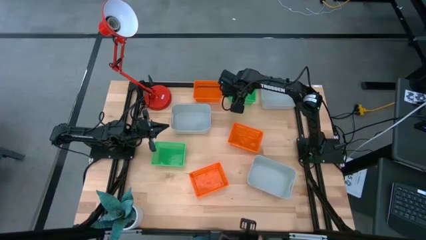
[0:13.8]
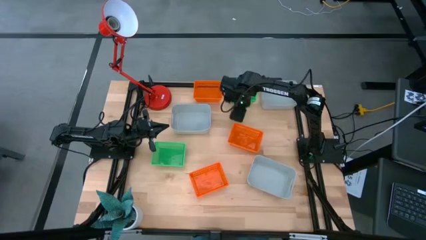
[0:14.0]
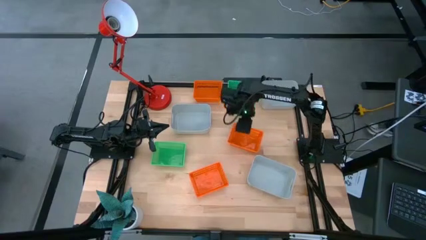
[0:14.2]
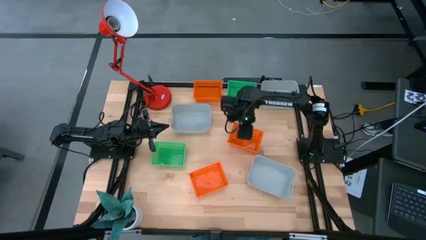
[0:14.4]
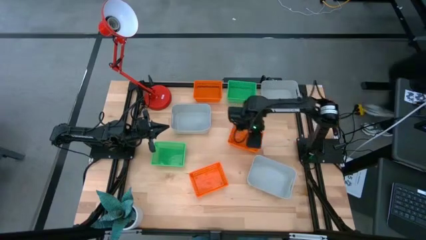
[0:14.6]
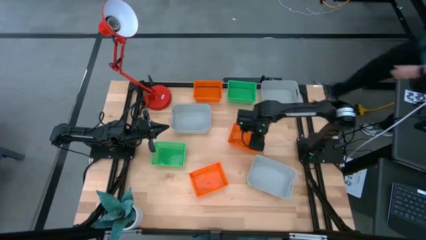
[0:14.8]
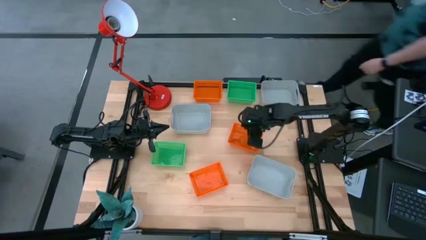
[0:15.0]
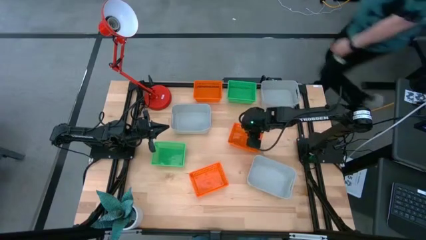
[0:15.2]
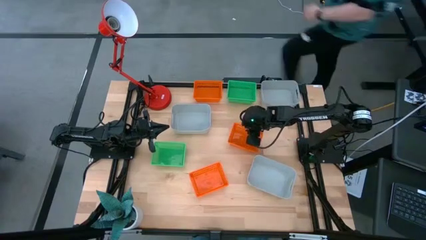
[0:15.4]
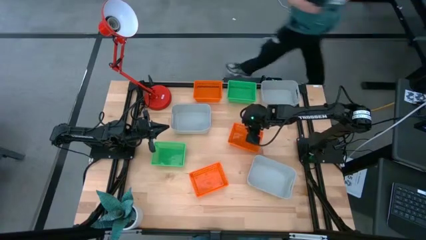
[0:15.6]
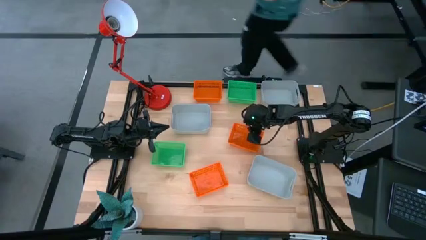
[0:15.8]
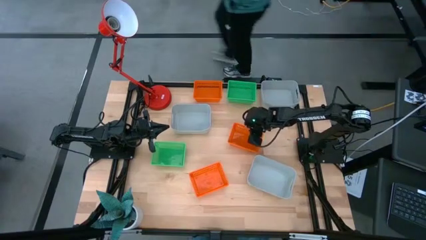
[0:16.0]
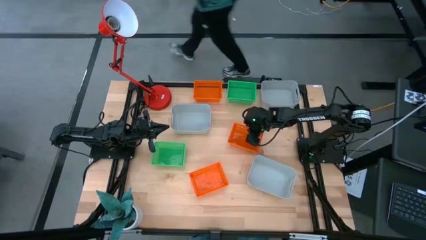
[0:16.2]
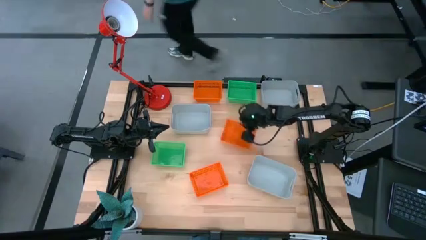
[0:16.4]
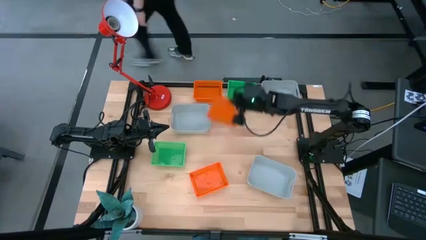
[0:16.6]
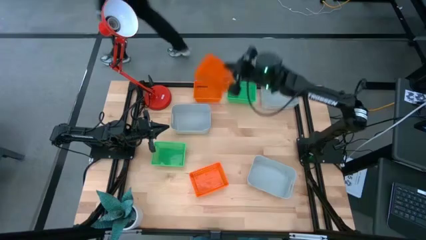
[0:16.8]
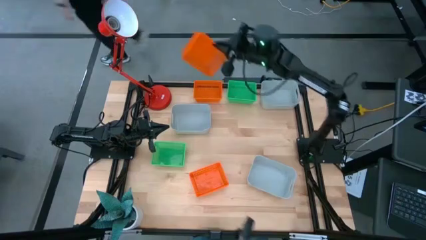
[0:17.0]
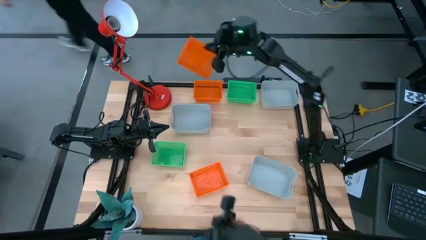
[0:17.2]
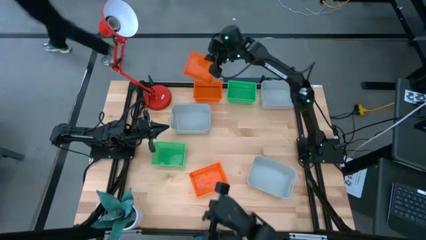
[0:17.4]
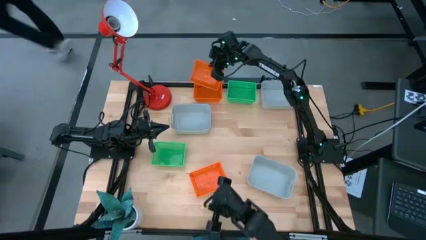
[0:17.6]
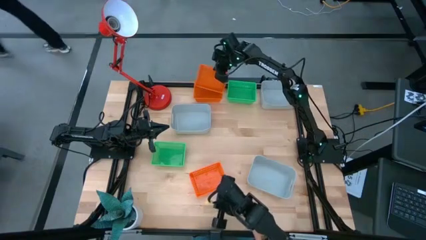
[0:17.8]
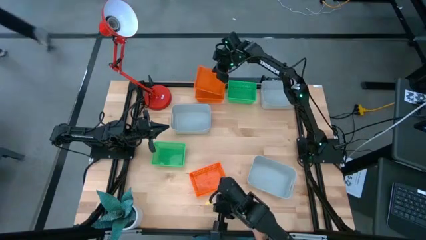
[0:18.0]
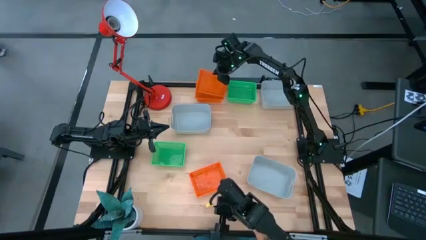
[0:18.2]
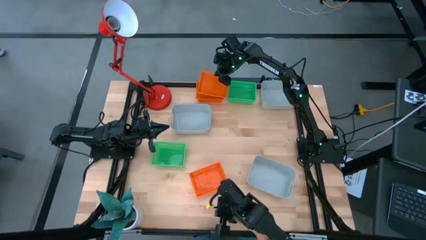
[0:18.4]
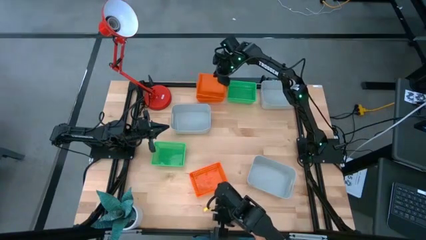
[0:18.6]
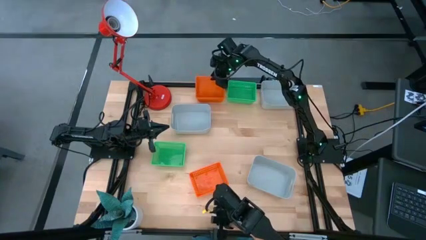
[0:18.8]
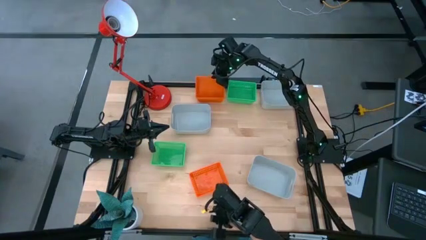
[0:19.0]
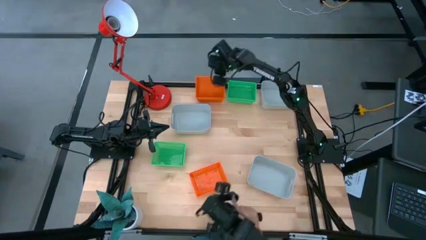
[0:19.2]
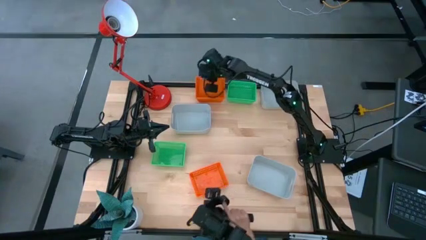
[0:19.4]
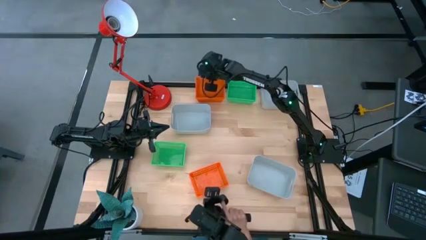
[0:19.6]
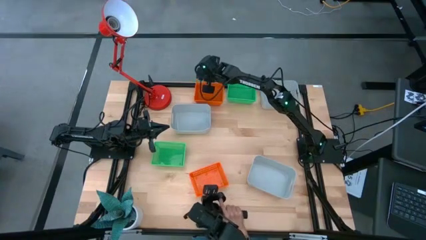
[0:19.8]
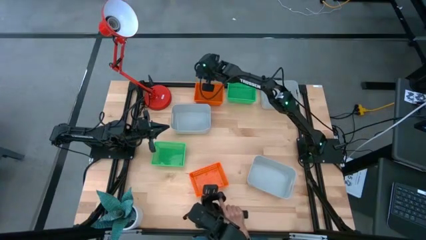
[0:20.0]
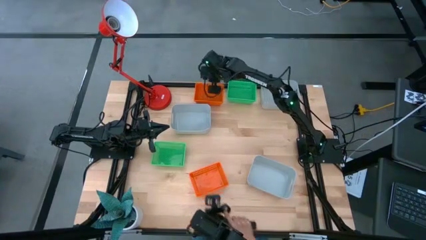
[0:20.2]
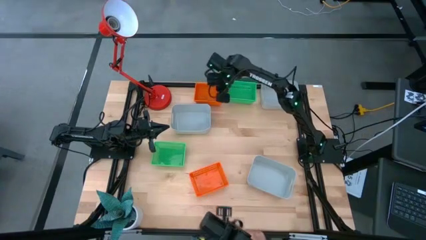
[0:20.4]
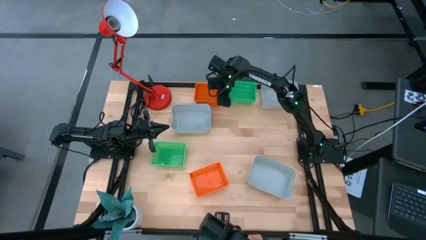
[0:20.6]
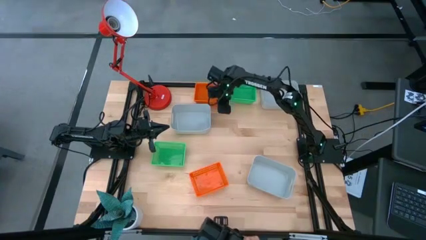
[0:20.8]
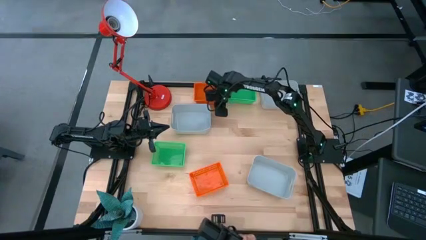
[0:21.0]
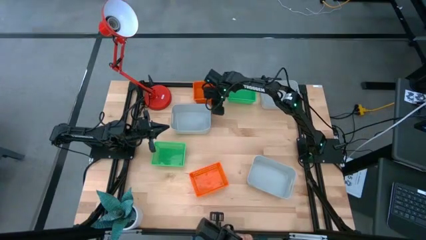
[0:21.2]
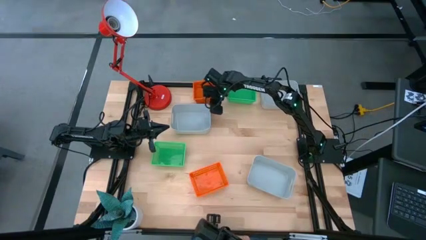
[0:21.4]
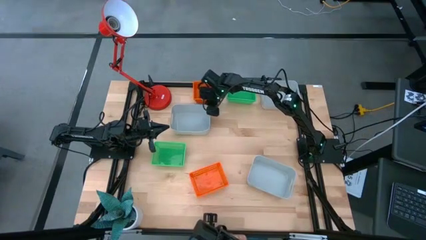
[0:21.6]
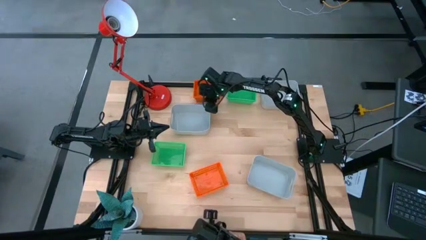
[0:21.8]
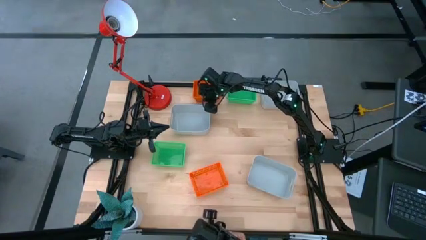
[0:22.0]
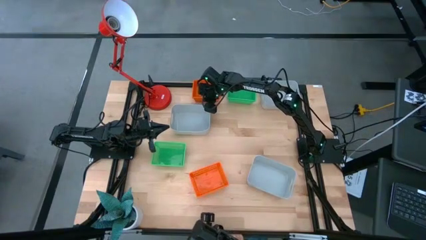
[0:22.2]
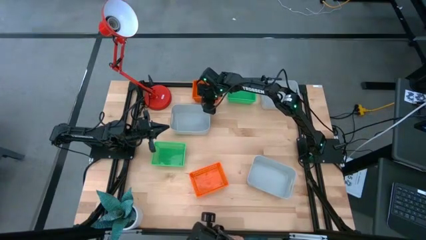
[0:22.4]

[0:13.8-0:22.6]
Stack the middle orange bin on the top orange bin

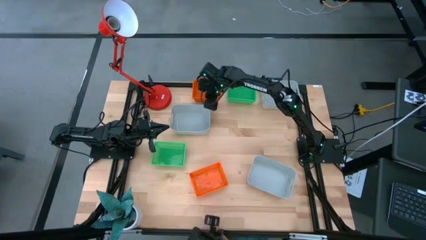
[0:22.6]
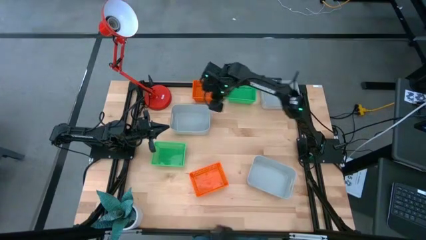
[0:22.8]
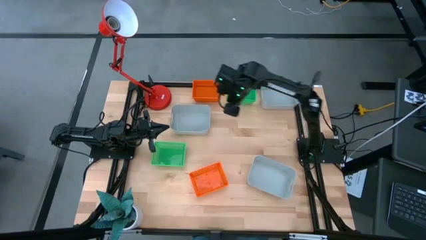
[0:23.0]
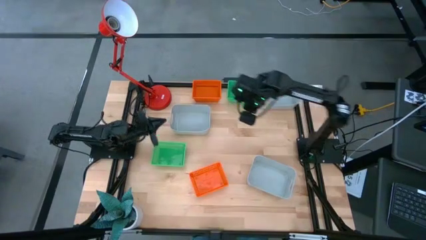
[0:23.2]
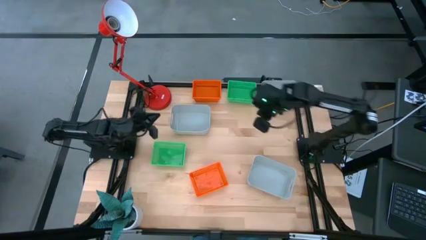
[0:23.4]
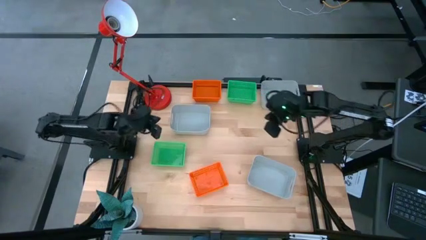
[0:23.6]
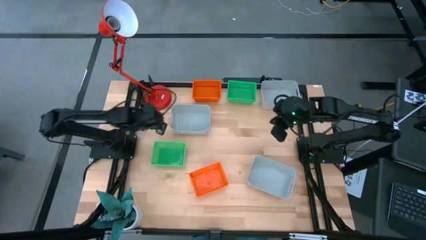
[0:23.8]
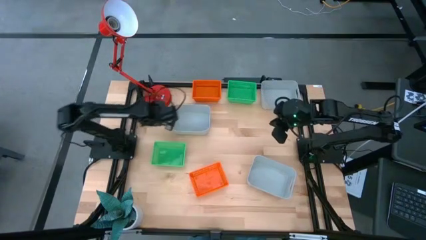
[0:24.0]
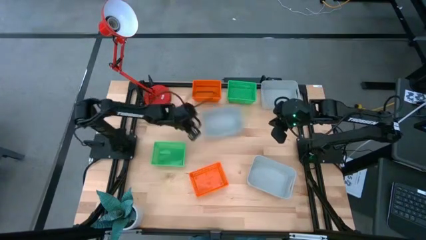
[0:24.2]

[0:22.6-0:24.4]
Move the left gray bin to the middle right of the table

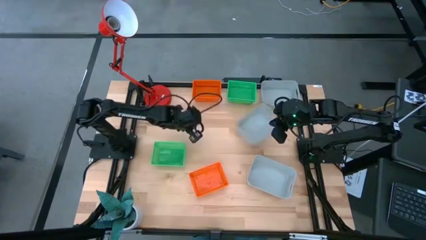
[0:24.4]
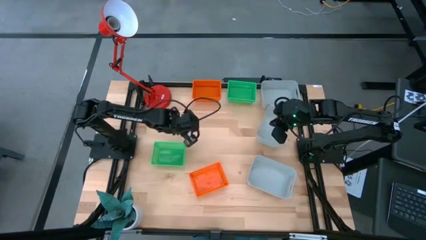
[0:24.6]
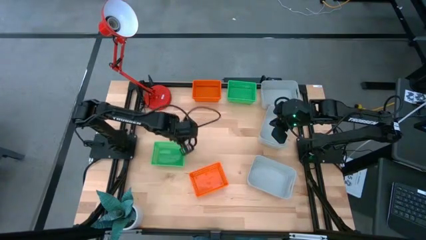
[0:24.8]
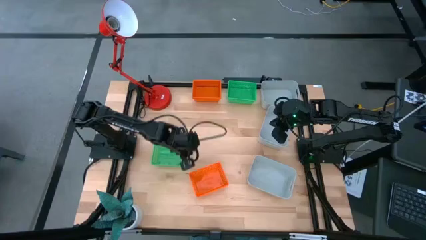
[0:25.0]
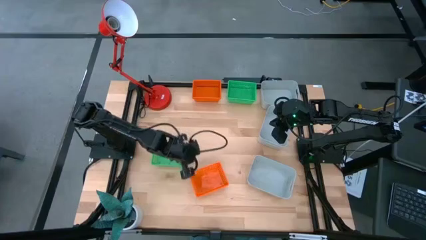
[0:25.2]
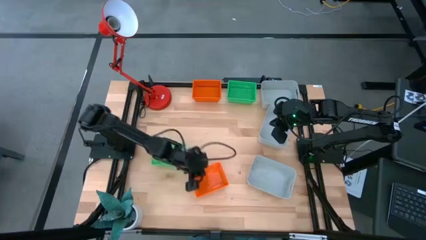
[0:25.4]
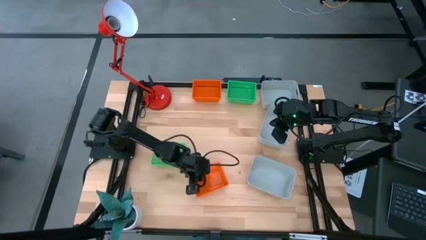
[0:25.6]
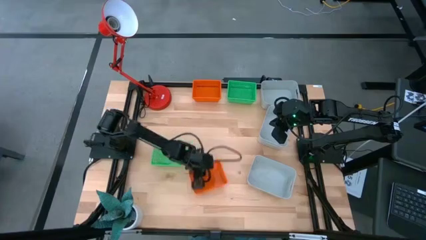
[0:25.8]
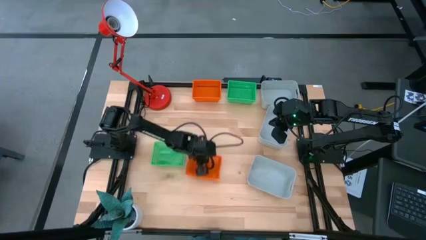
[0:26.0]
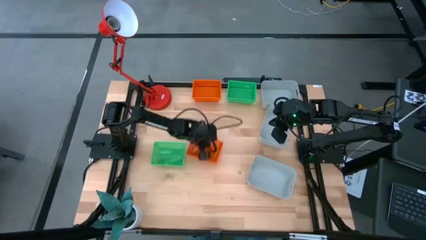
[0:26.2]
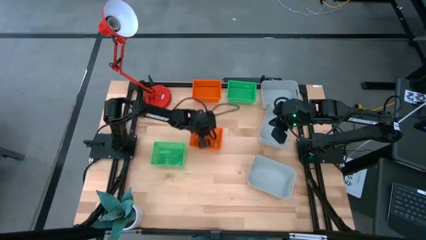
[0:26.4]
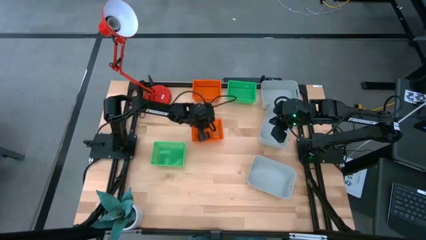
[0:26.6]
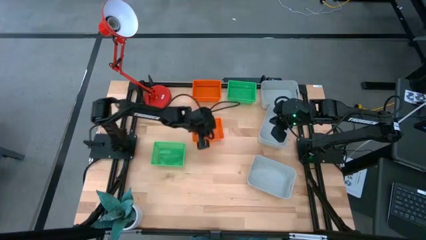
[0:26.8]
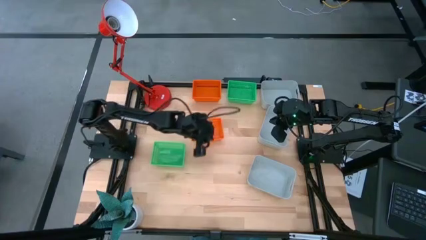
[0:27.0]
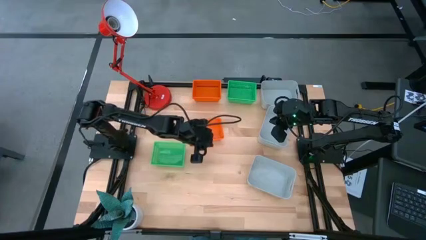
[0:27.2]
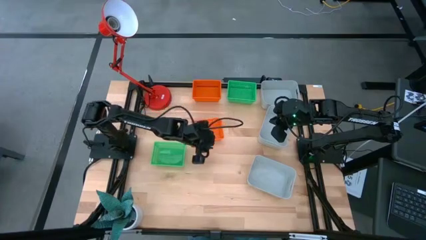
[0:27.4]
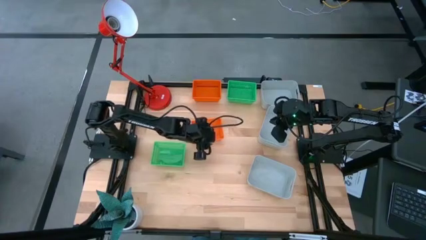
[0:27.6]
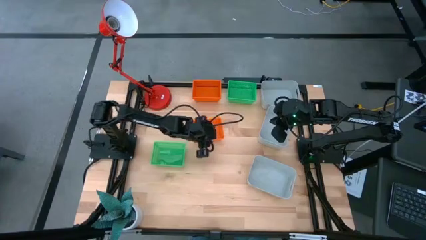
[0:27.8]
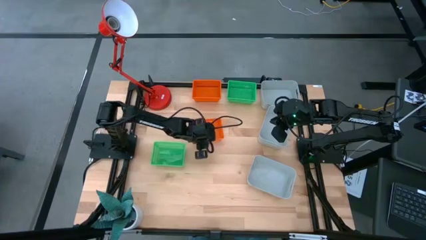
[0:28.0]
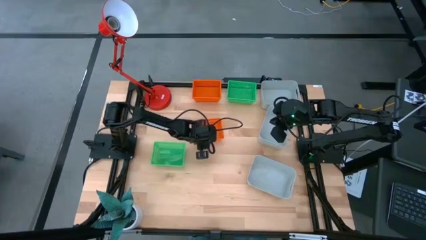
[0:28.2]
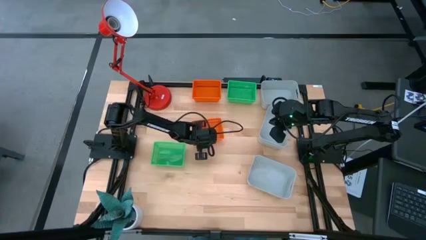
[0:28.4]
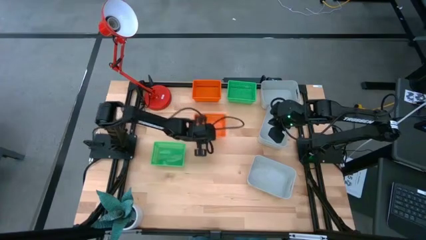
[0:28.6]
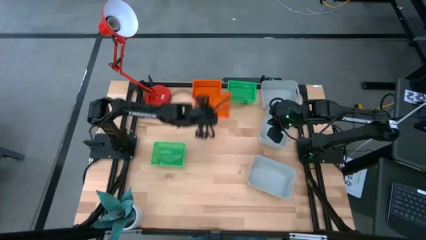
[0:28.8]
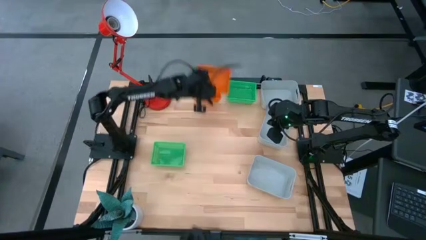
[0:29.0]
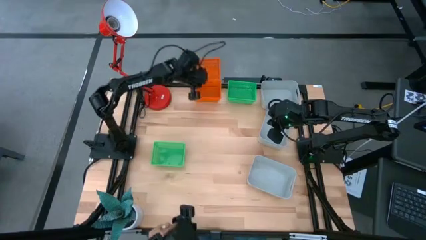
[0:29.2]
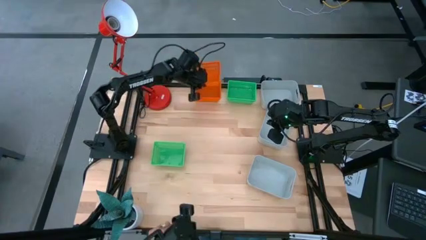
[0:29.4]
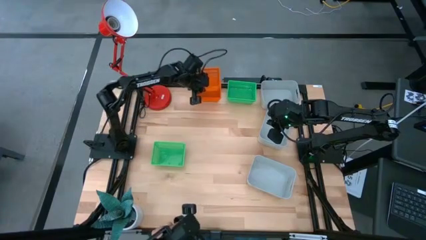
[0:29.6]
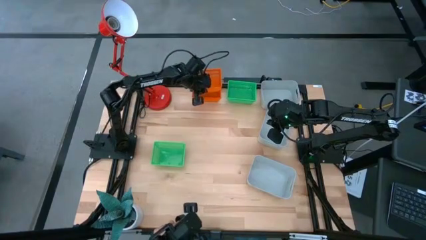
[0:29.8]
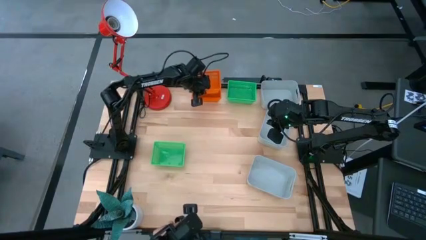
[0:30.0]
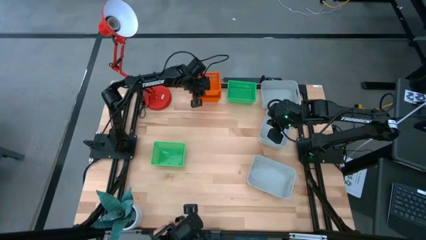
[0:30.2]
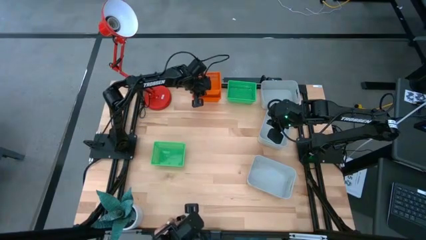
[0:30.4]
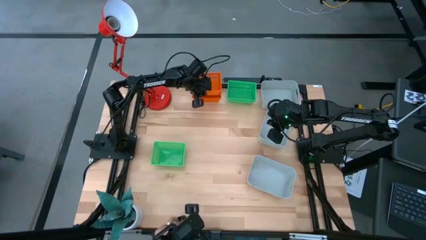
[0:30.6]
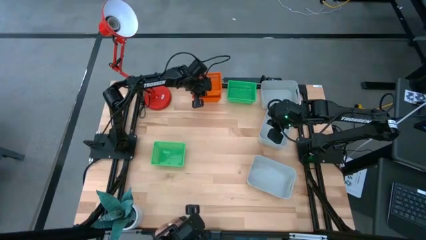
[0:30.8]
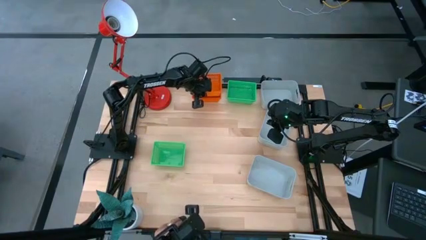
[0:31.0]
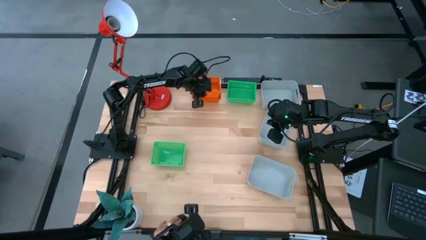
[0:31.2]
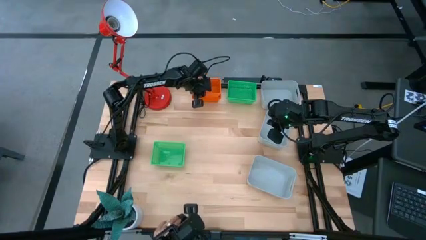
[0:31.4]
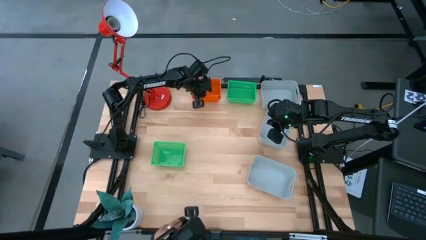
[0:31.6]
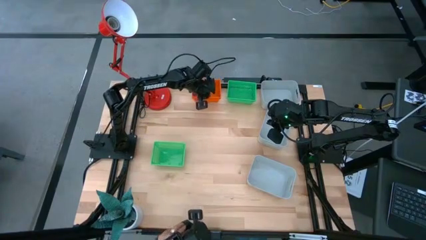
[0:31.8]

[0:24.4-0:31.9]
Stack the orange bin on the top orange bin
